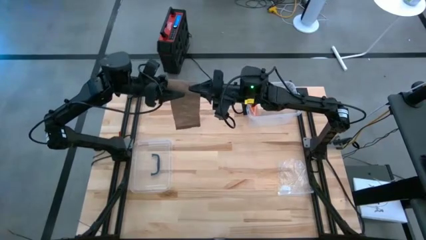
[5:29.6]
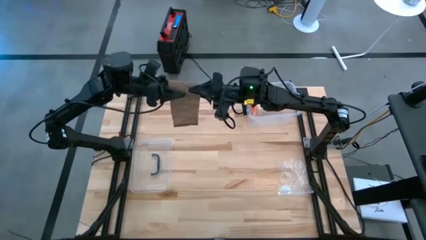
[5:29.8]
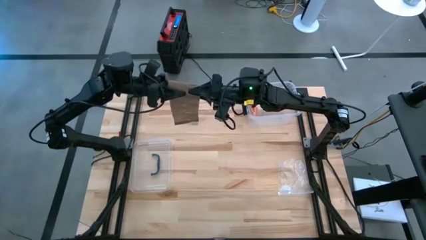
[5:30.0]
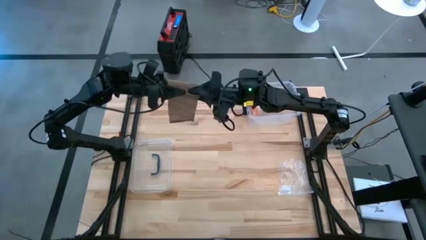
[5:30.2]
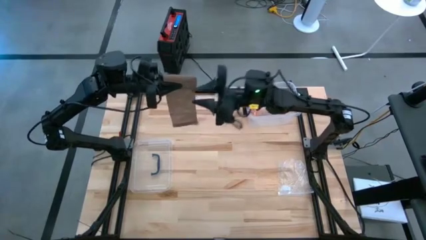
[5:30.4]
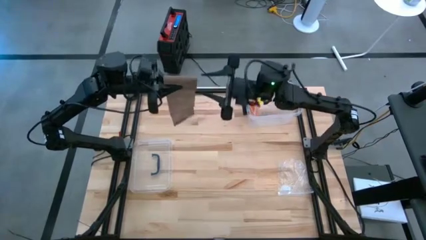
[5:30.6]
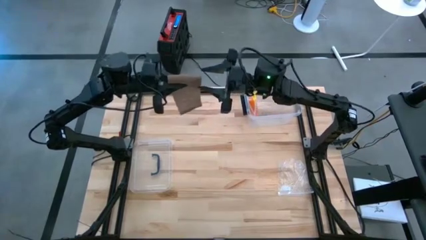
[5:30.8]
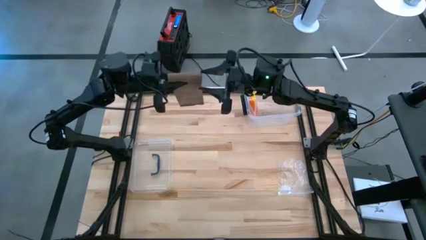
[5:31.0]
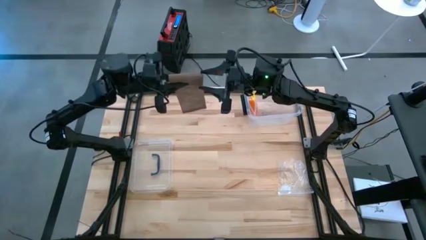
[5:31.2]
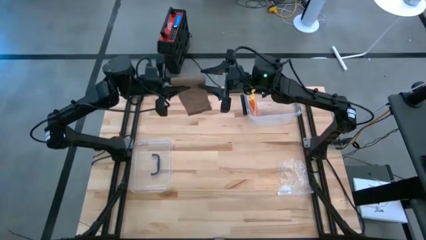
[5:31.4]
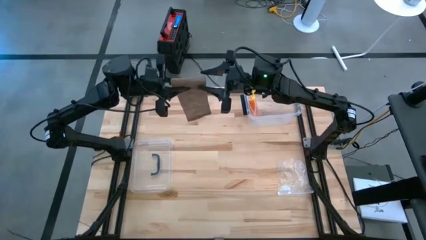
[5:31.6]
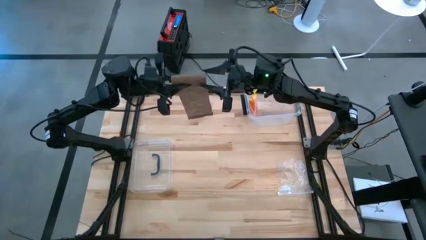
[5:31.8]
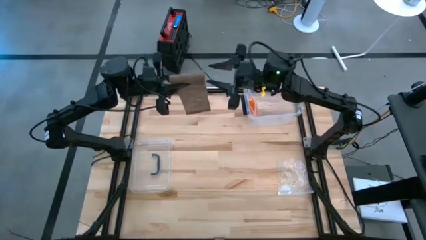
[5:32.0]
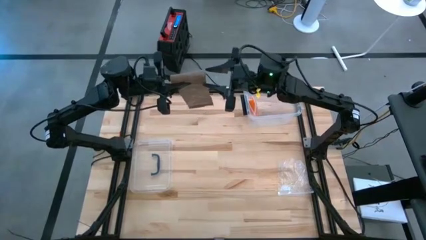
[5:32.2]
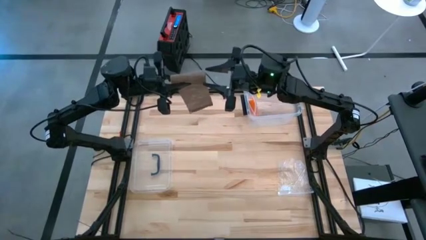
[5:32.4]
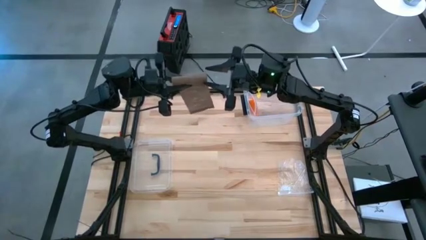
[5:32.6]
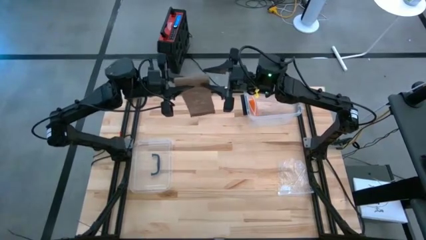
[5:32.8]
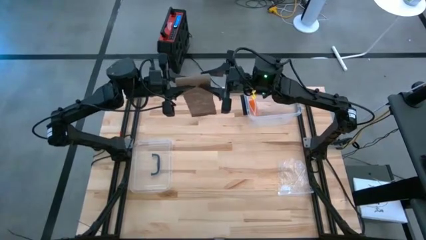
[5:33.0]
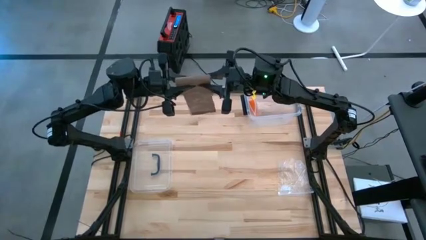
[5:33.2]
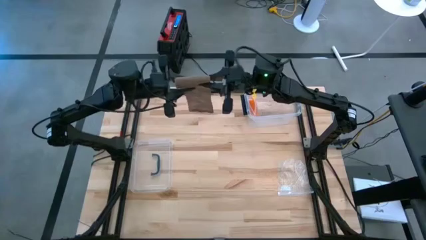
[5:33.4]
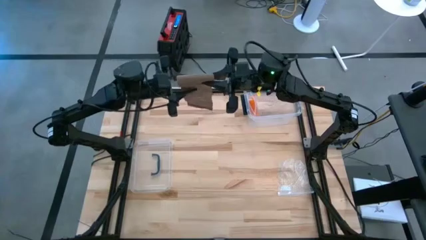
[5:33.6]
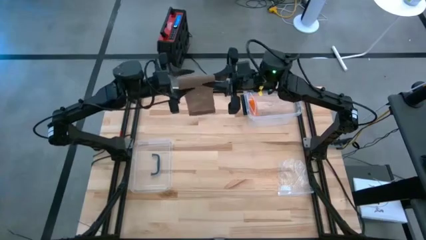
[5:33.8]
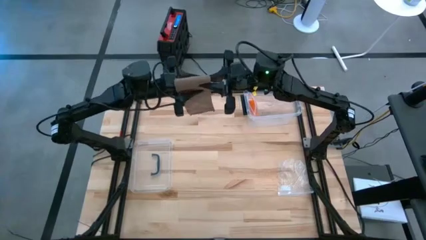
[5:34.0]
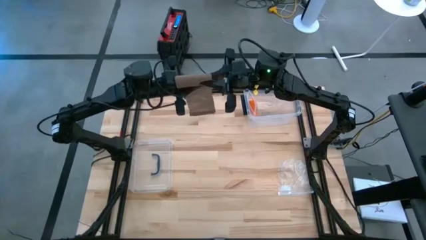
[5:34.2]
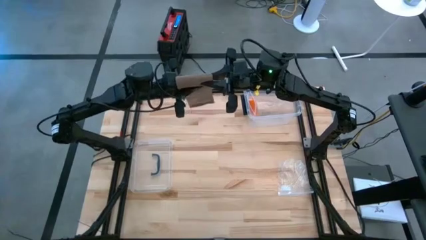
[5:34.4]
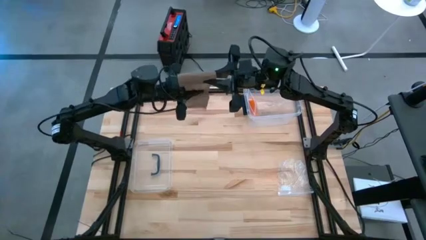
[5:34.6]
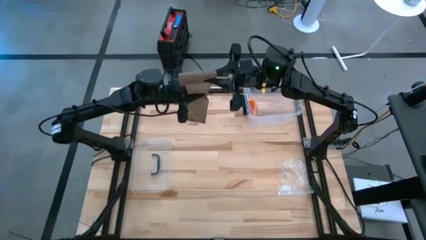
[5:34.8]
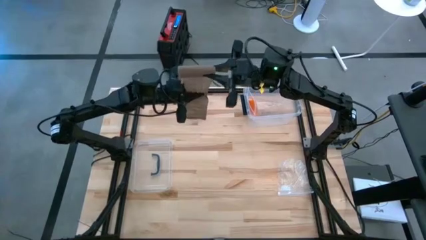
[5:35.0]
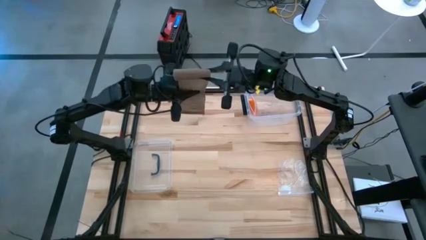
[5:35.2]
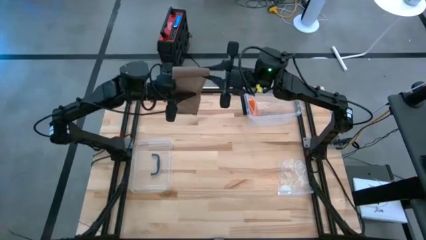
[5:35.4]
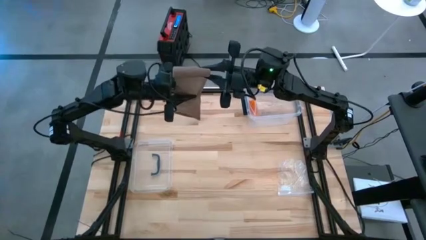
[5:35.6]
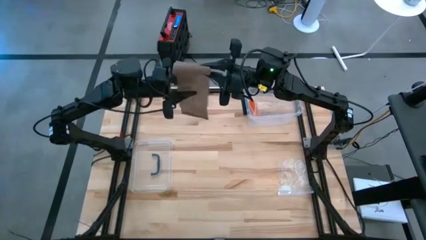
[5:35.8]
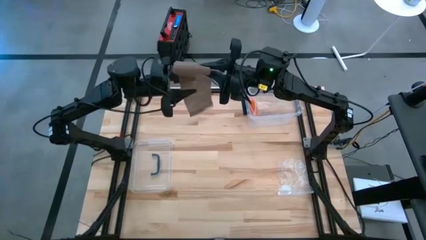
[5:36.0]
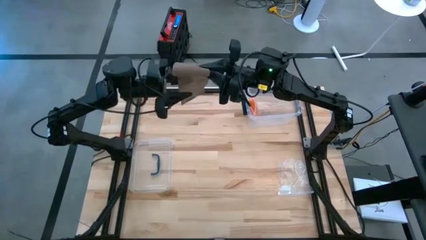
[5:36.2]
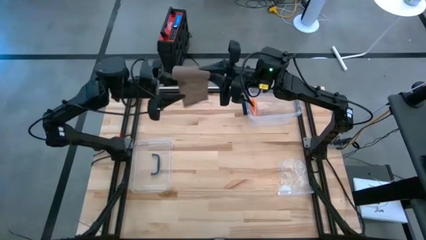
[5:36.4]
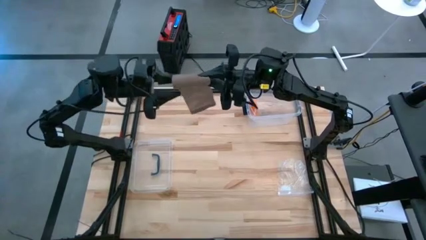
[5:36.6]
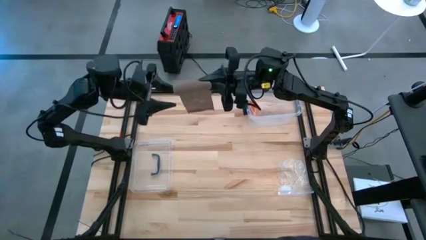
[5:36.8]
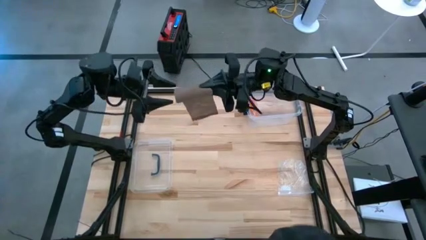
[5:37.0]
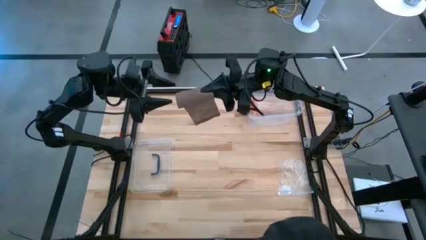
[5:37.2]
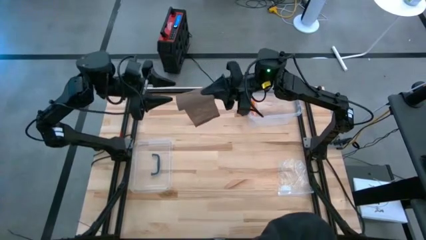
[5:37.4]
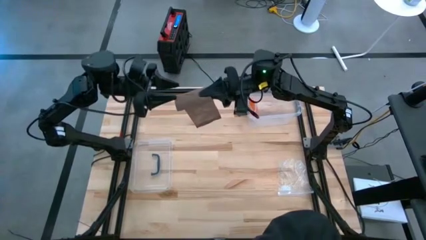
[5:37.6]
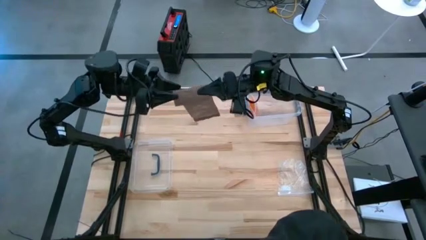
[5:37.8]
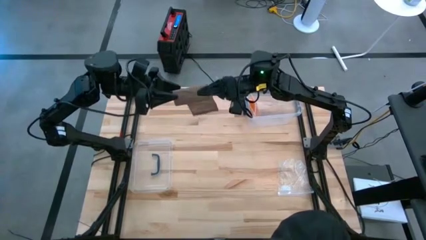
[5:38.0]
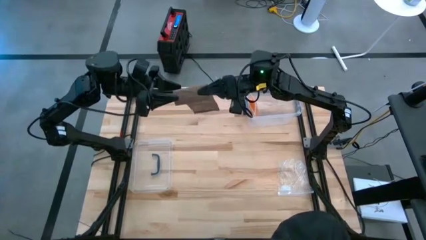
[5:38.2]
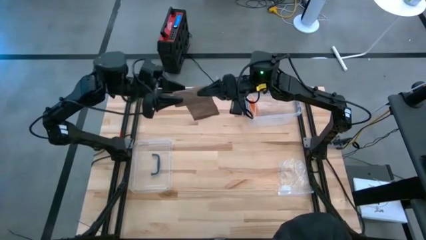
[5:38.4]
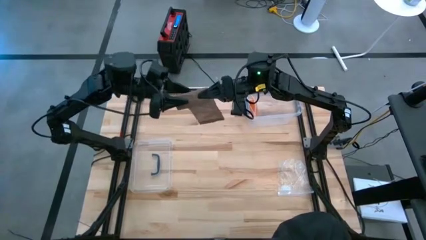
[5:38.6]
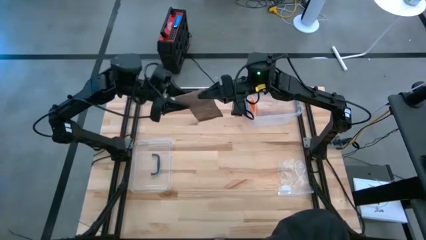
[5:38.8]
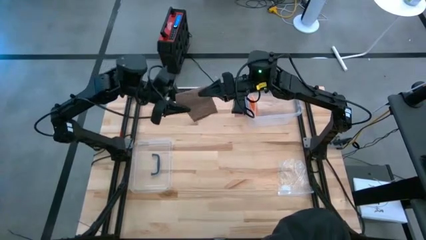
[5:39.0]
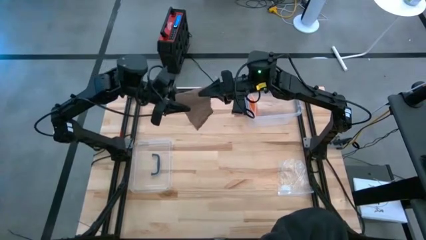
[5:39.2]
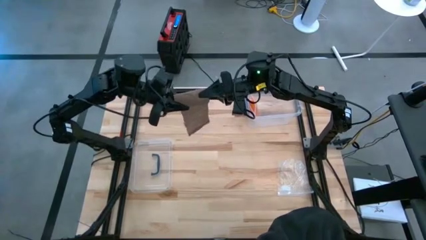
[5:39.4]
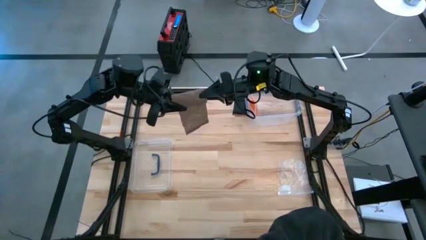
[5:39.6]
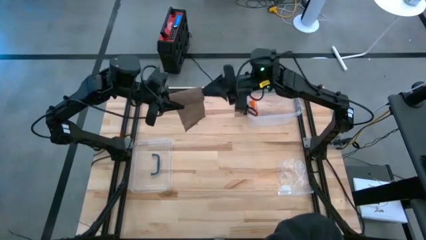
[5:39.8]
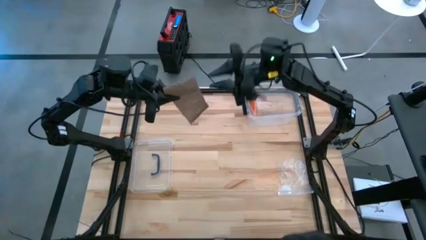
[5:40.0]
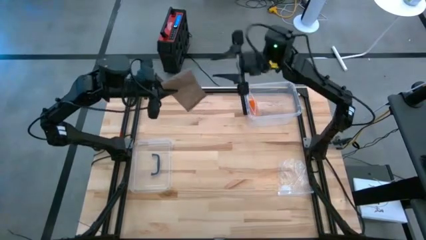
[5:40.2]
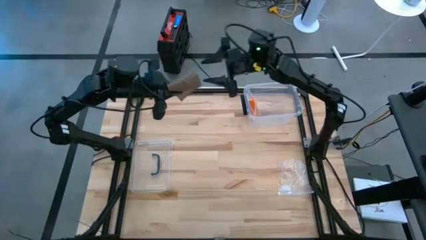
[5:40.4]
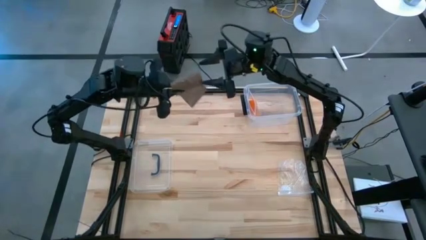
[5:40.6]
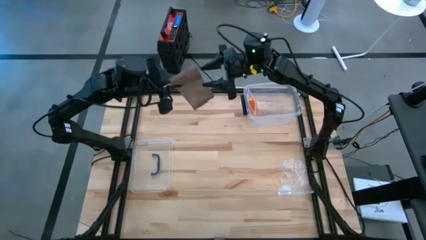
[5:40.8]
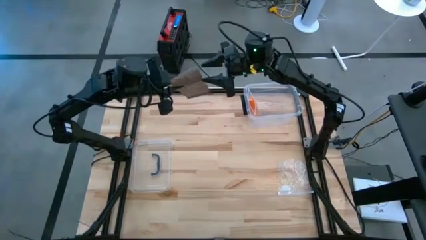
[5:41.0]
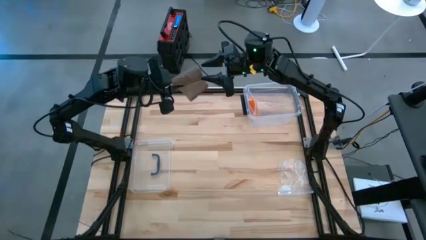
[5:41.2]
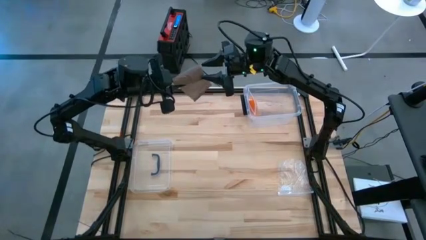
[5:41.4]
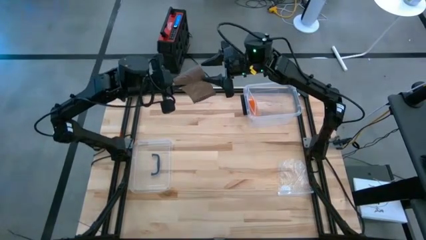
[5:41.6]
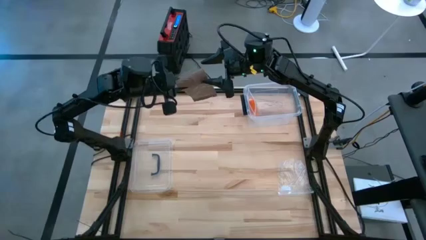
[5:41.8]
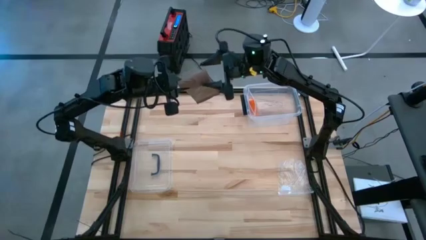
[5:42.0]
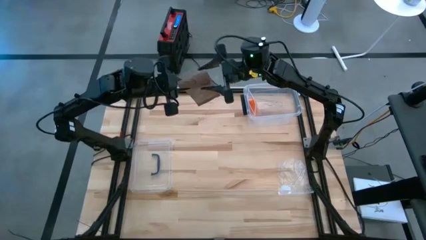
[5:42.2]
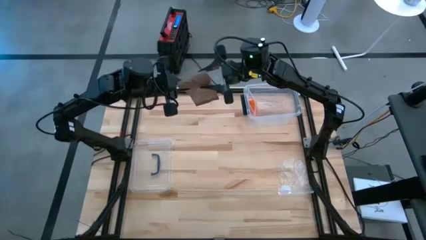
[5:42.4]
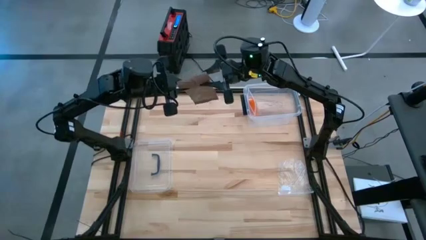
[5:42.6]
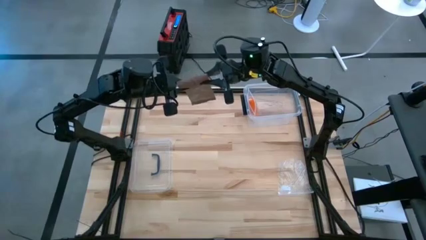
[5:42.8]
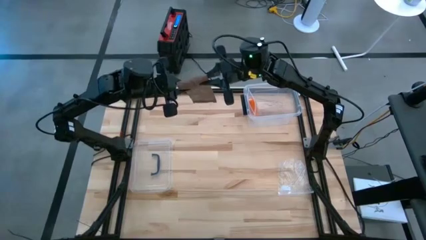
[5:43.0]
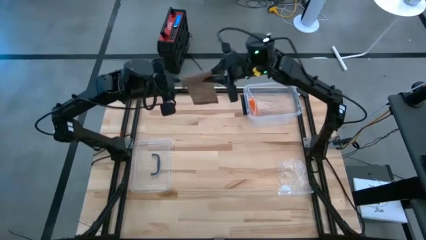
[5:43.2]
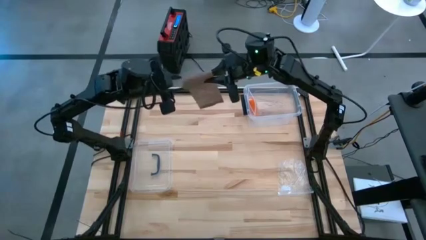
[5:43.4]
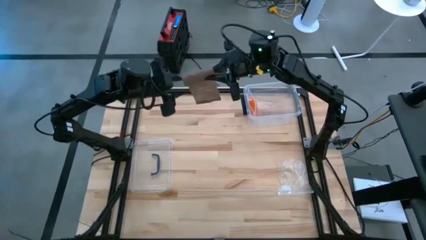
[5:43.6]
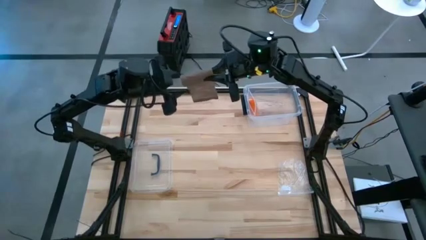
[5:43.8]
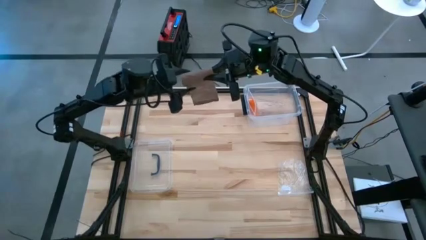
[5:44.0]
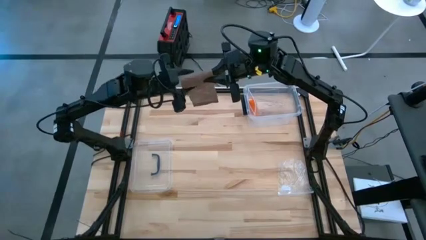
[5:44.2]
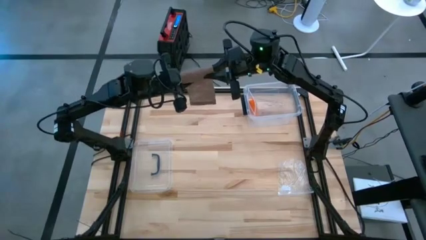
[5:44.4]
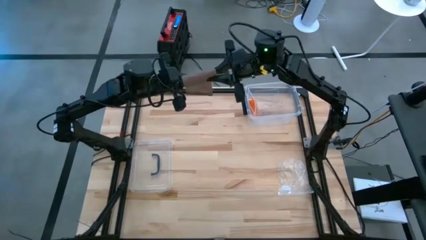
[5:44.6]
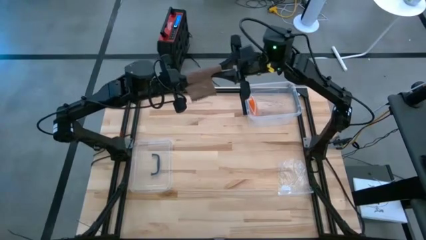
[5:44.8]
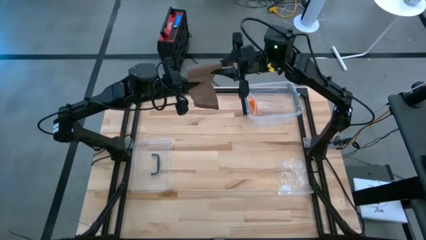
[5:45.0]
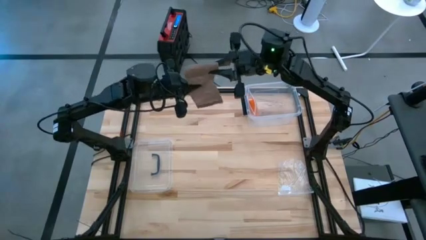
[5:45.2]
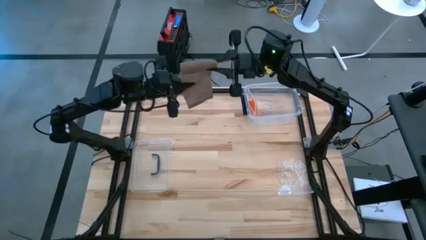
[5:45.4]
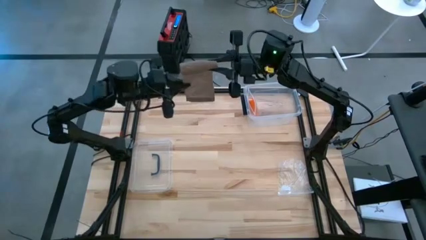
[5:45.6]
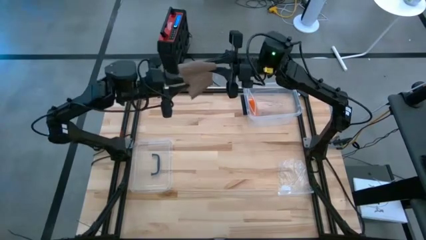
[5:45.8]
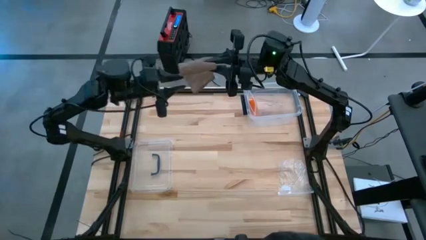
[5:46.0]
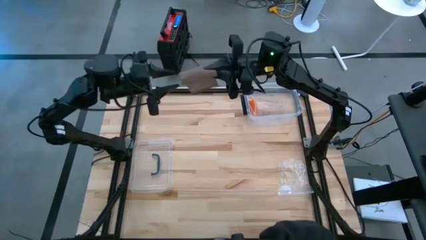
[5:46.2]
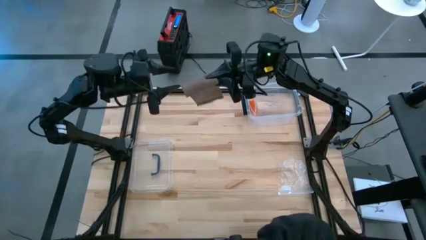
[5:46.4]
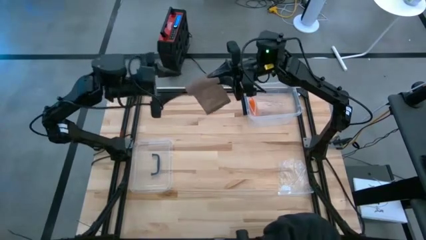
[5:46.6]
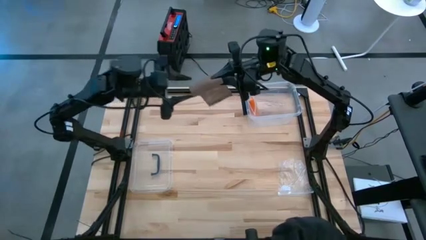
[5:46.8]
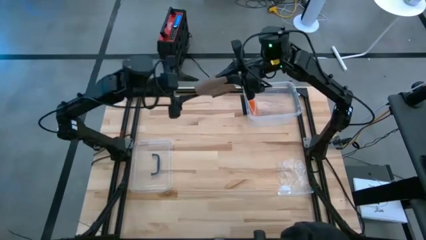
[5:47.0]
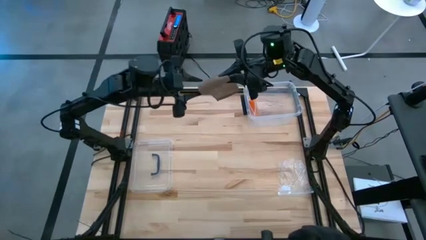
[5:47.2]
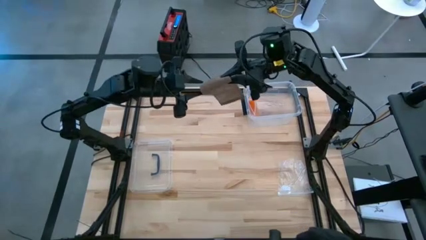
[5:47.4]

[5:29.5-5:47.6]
Task: Roll bandage
Roll the brown bandage
